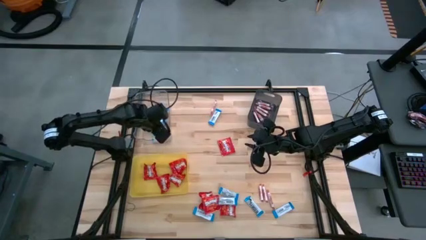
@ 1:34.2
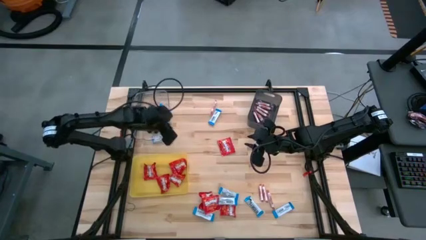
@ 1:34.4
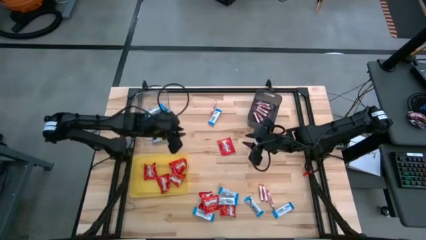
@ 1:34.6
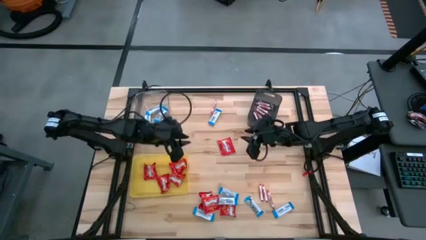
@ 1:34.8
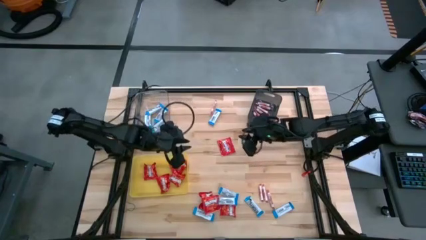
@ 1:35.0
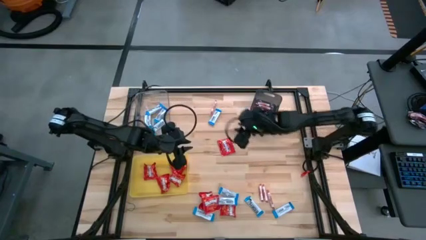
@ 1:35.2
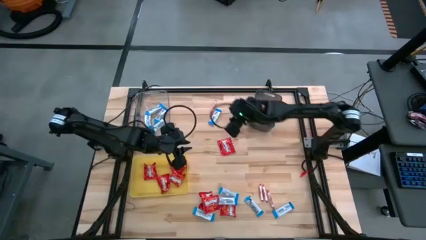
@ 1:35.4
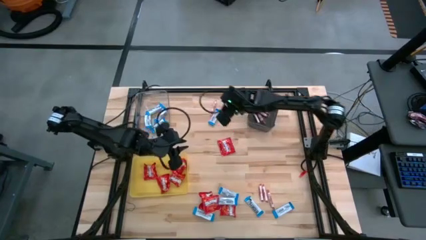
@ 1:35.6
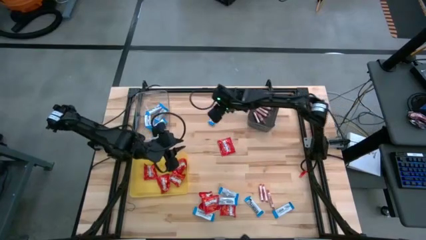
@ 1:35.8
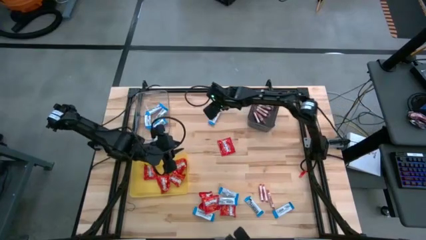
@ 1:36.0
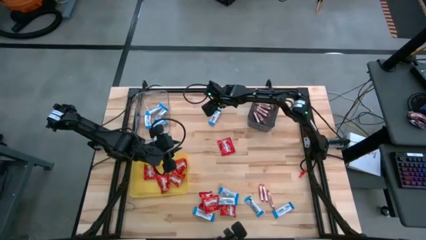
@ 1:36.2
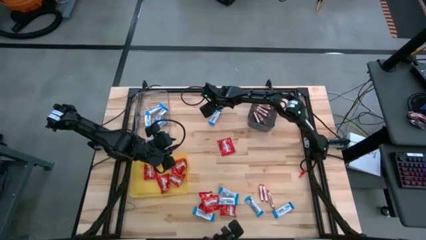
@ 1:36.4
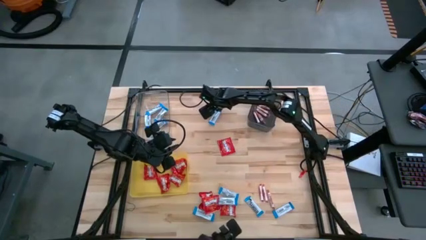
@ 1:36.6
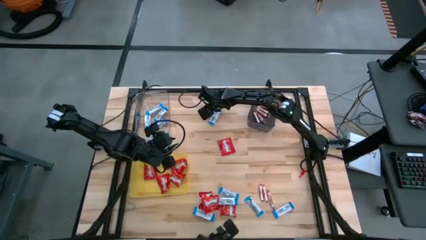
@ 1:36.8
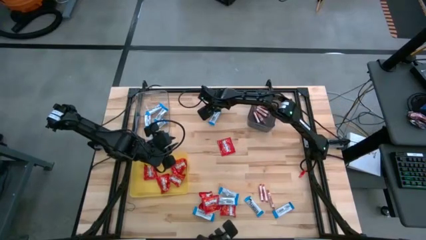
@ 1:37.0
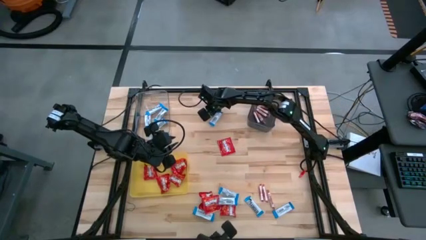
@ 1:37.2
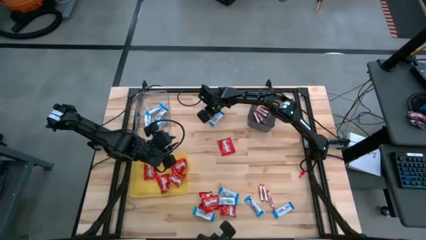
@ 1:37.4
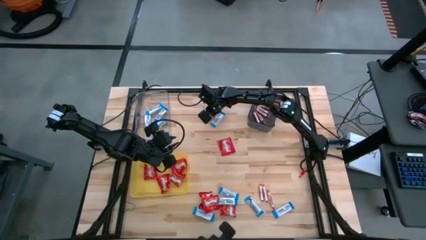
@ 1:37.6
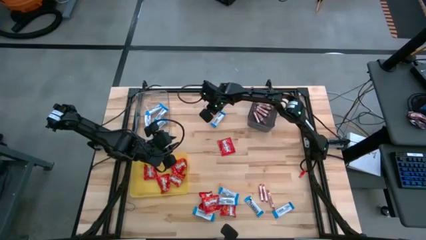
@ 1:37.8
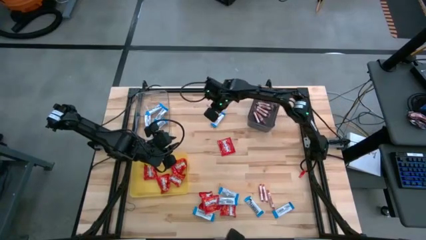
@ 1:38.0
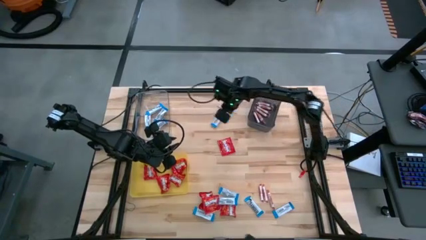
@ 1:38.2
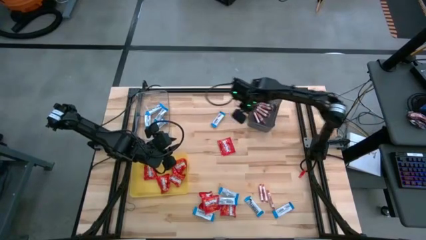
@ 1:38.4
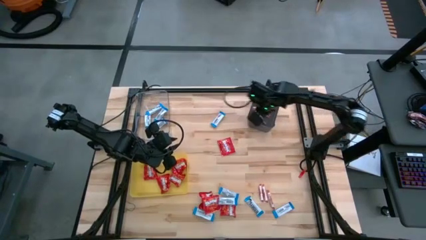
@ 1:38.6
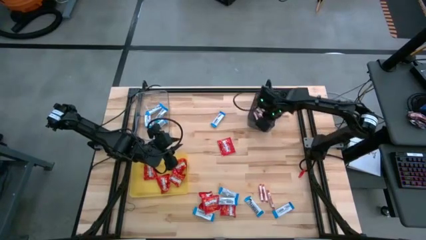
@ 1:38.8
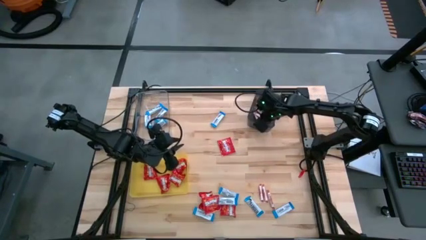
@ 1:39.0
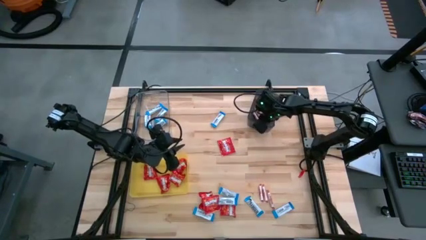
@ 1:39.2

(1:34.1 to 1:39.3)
Task: Sort candy
Put the white candy into the black bin

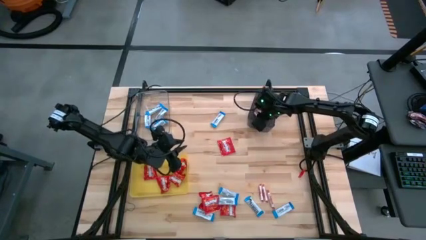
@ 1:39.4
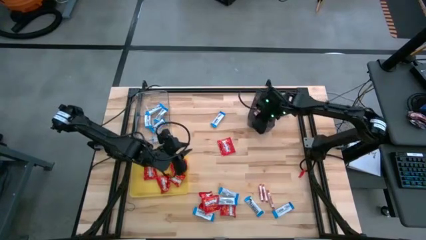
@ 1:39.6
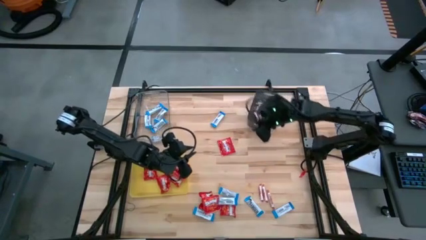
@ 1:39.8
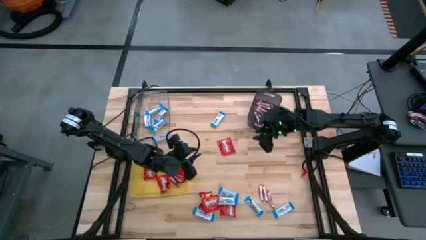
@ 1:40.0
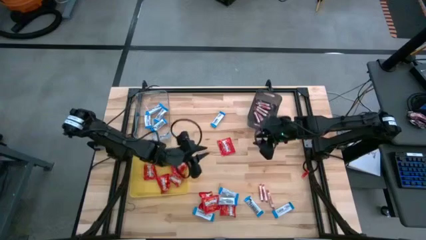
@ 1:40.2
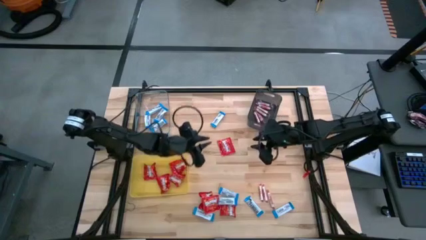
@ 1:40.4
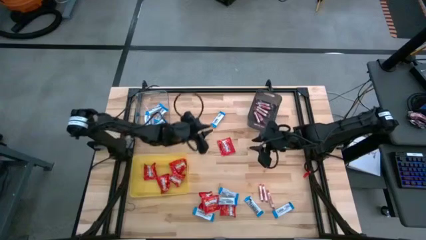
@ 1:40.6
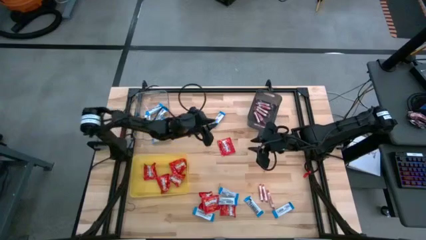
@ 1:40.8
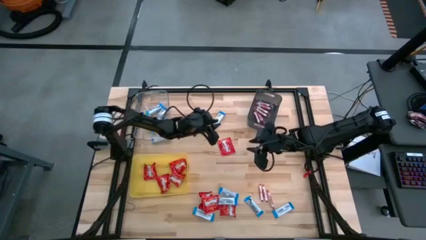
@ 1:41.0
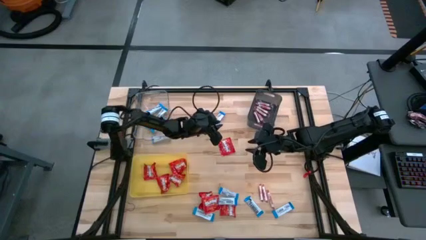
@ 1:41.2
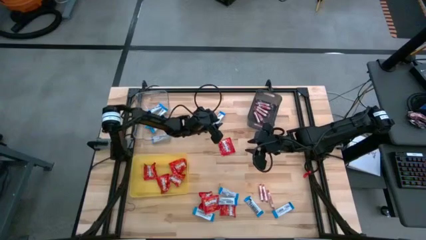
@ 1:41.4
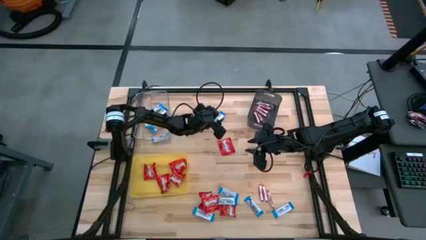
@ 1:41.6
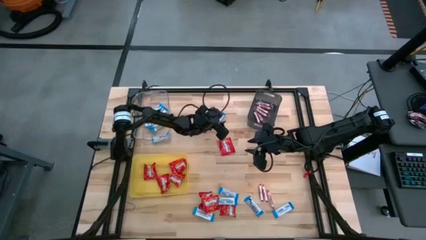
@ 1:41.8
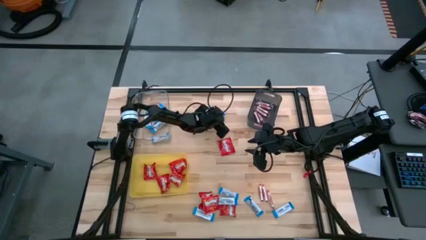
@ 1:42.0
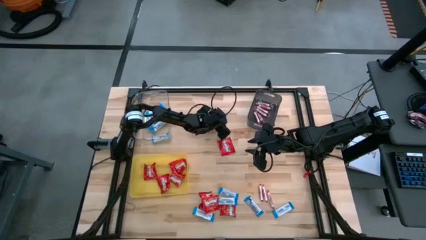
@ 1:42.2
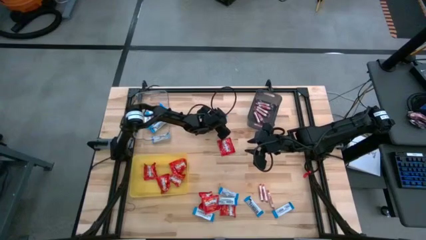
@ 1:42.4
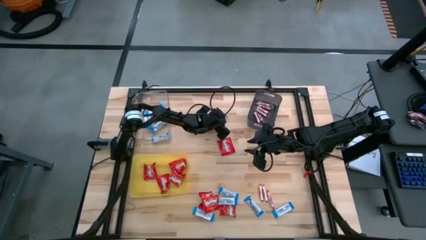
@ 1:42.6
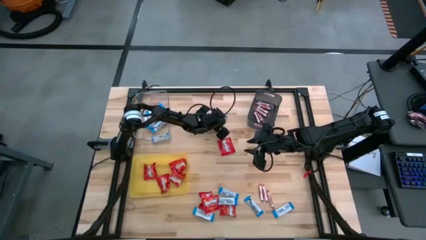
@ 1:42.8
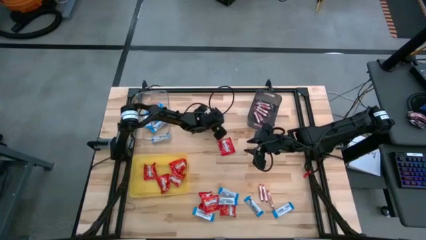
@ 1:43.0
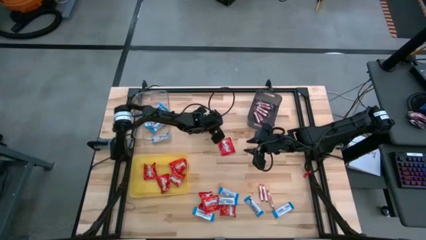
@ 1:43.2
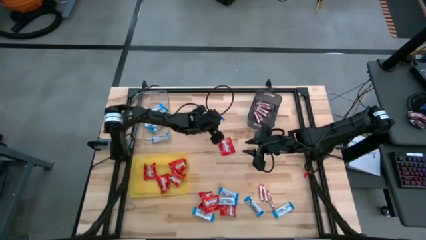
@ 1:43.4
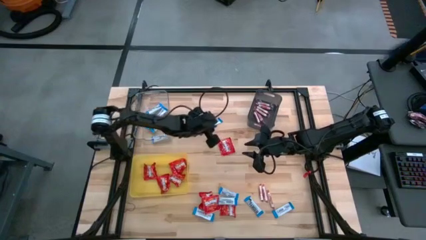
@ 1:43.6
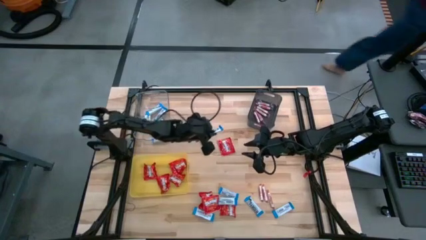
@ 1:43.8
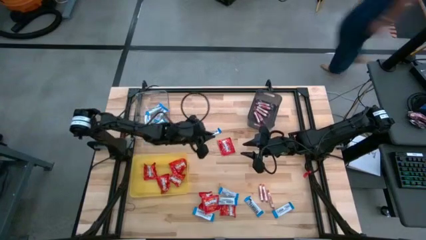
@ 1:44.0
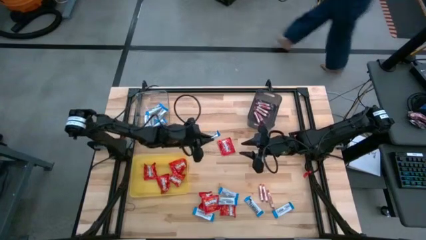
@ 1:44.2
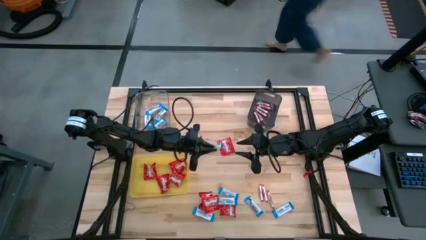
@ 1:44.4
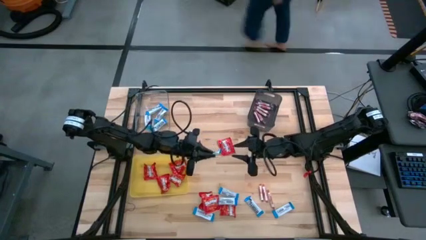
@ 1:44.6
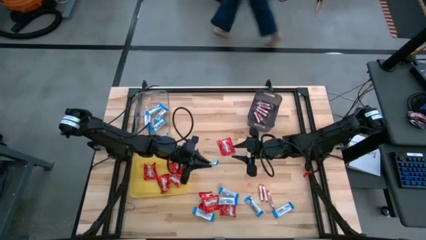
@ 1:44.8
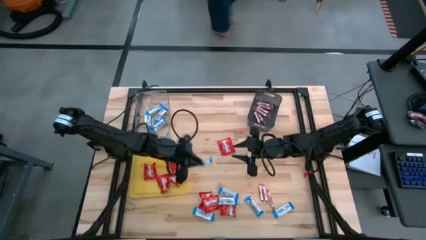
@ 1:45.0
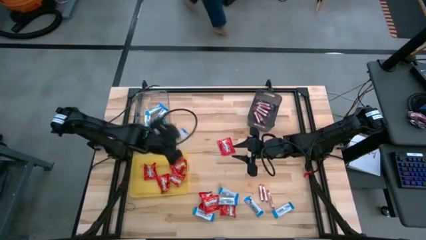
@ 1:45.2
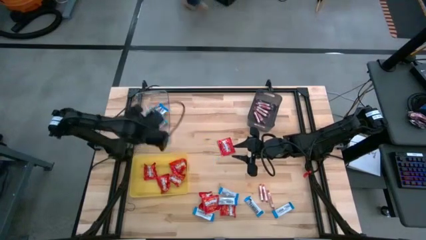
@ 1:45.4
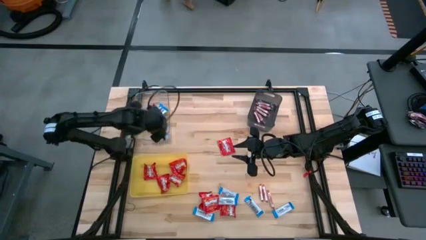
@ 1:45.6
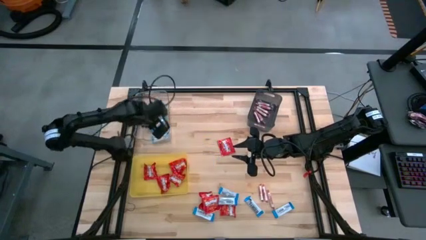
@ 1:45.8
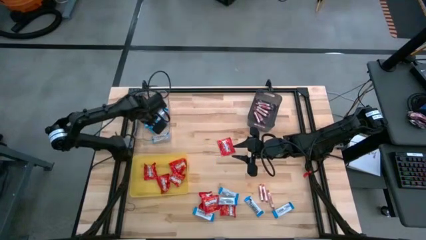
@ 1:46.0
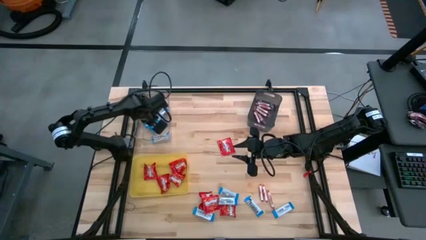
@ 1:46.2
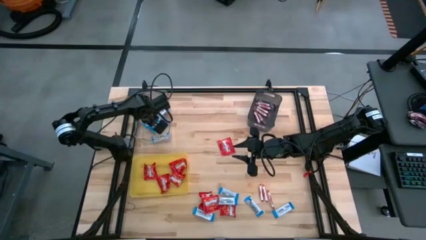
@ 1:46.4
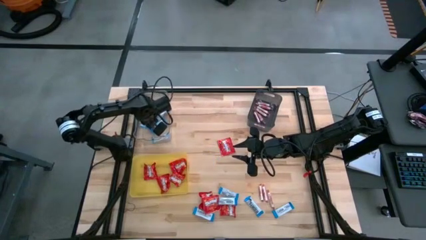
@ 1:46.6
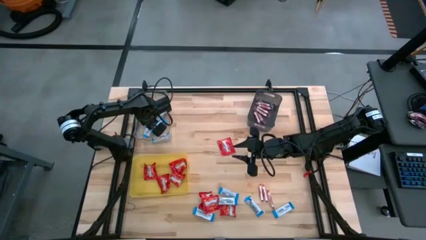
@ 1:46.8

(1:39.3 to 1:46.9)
Put the blue chocolate into the transparent bin

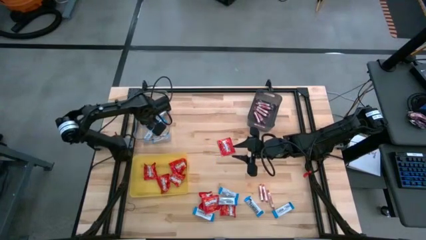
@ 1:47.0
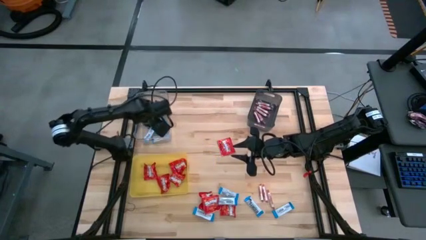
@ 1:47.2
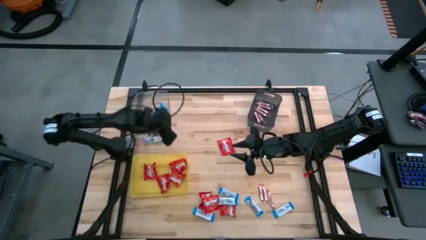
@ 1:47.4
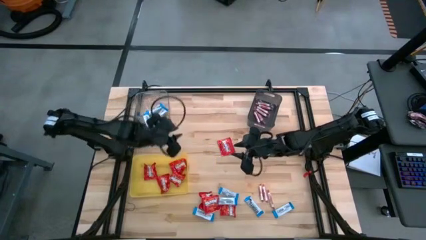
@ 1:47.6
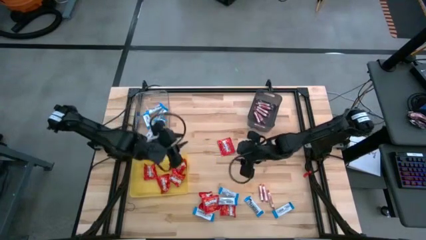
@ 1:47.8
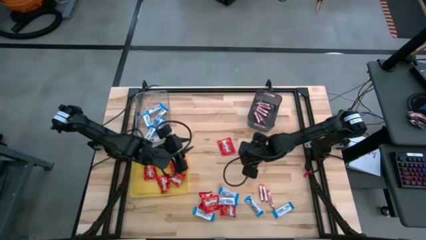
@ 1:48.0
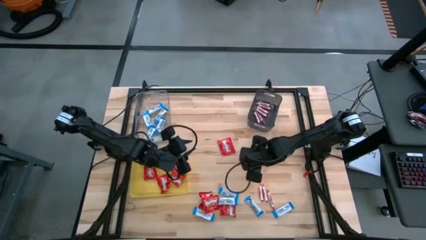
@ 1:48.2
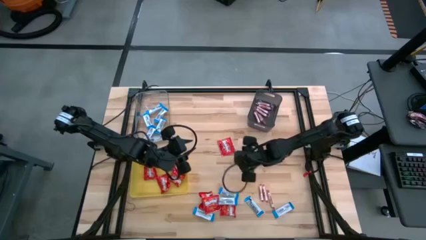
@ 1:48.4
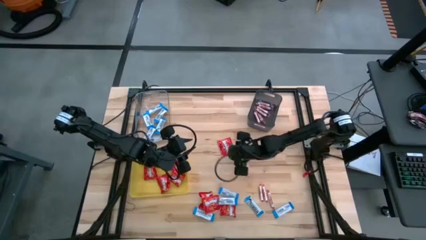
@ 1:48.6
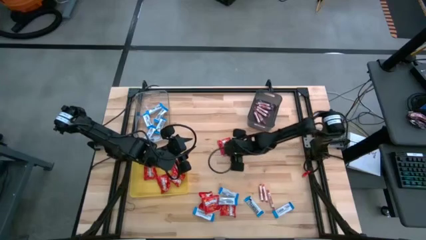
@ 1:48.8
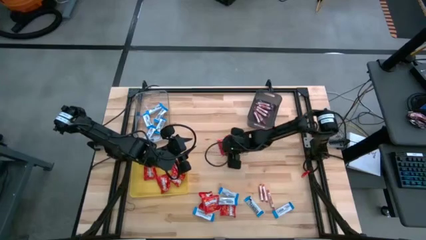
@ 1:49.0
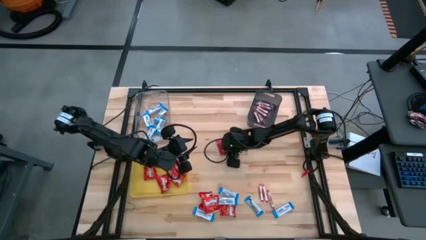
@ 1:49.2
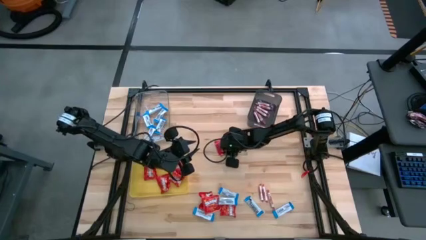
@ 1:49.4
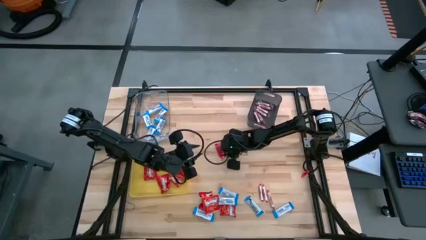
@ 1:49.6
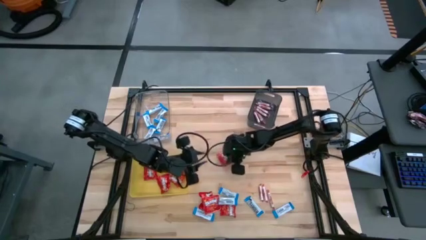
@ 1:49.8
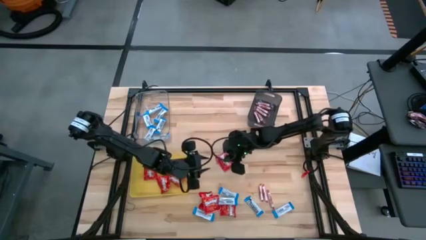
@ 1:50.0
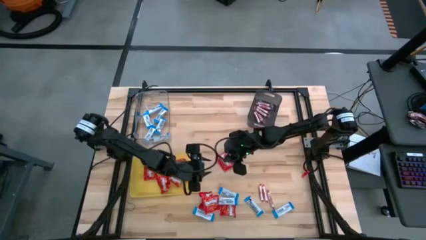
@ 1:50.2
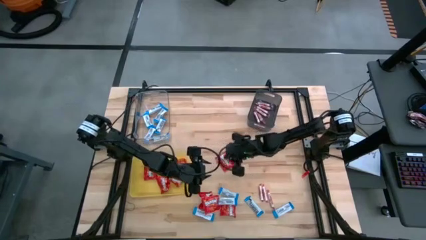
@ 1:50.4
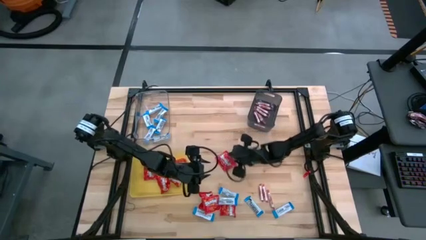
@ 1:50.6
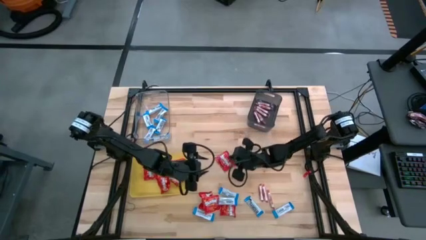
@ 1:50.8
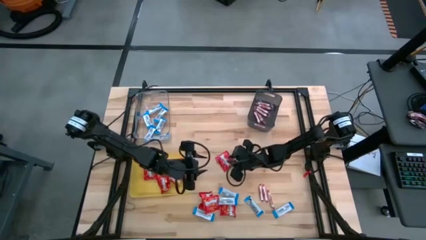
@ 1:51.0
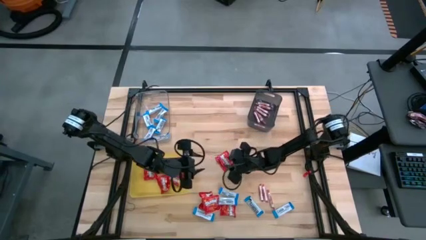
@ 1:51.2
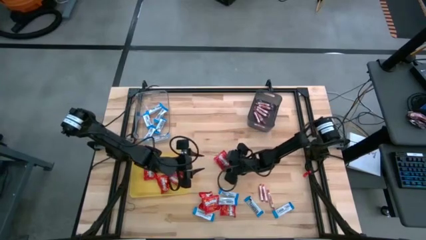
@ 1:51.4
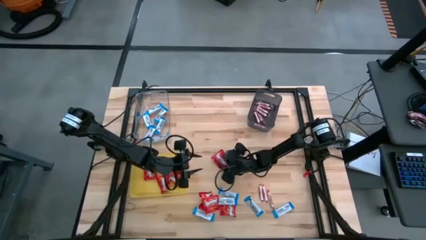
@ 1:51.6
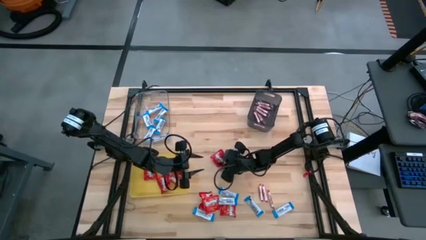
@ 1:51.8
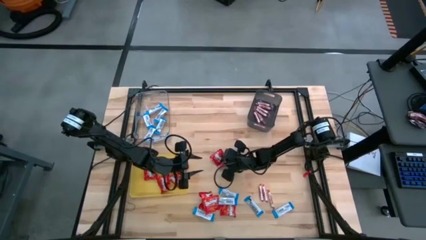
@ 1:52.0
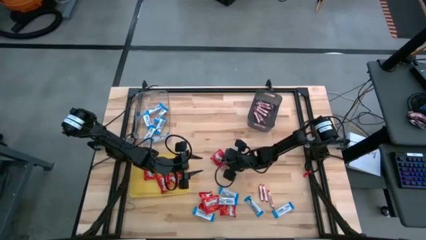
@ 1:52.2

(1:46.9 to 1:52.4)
Put the red chocolate into the yellow bin
